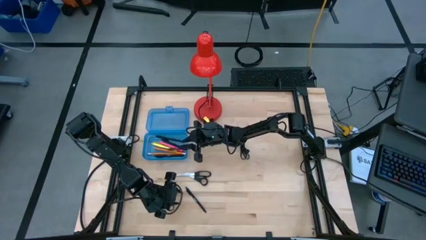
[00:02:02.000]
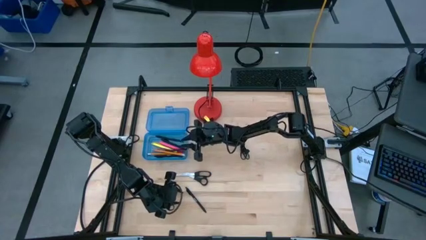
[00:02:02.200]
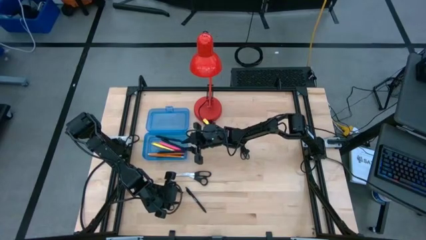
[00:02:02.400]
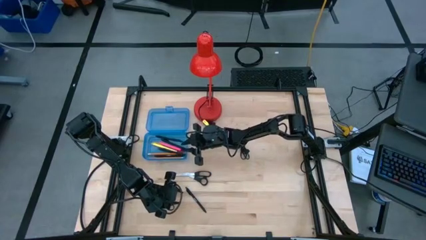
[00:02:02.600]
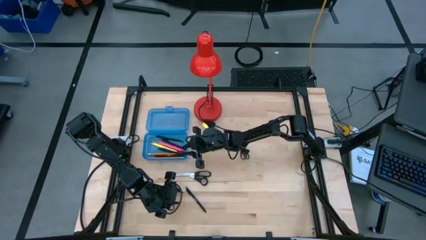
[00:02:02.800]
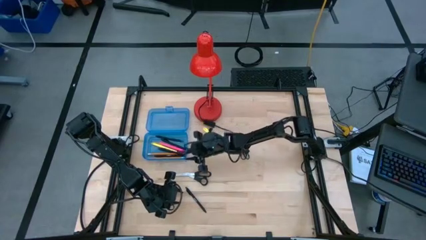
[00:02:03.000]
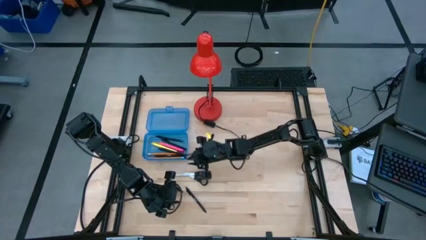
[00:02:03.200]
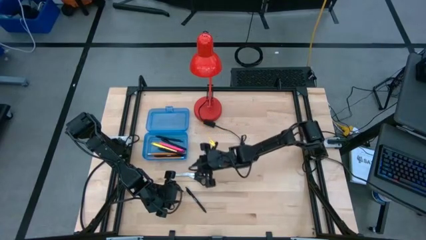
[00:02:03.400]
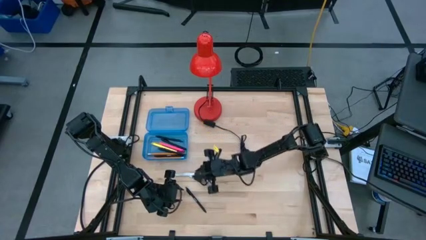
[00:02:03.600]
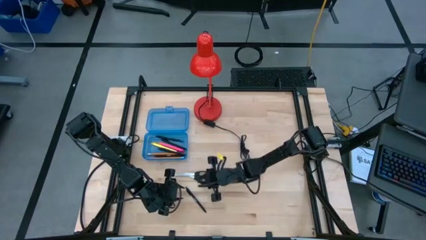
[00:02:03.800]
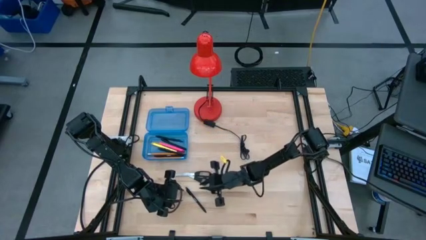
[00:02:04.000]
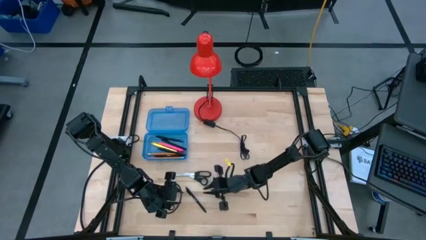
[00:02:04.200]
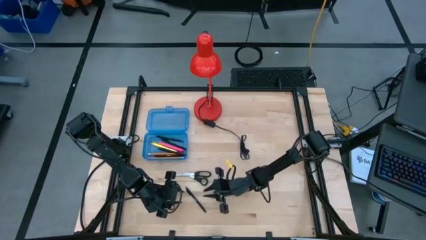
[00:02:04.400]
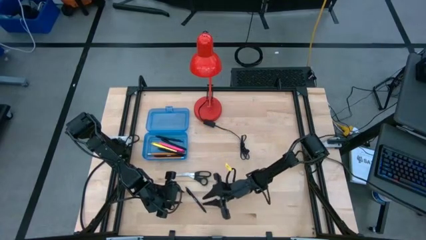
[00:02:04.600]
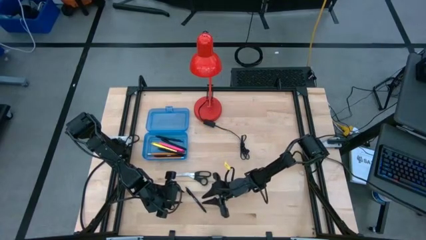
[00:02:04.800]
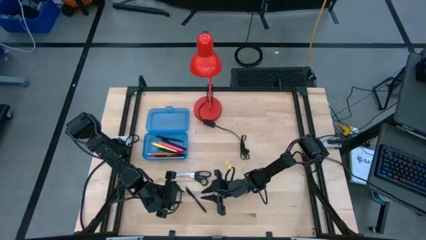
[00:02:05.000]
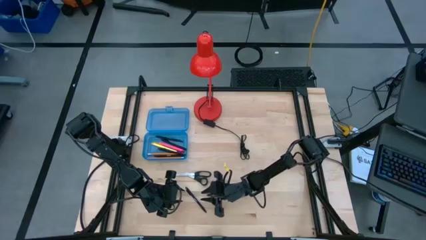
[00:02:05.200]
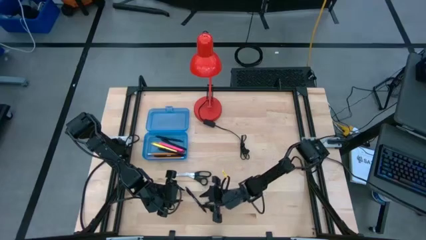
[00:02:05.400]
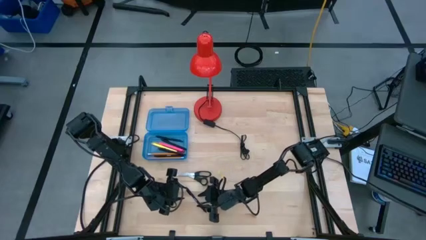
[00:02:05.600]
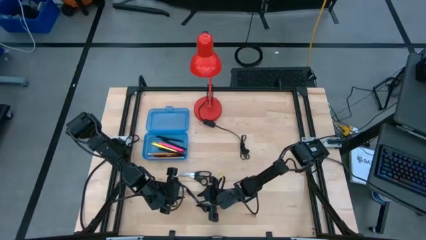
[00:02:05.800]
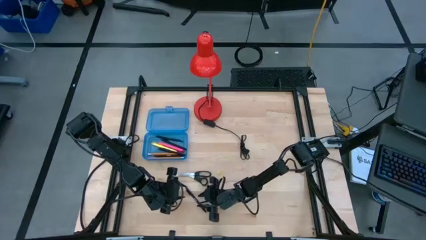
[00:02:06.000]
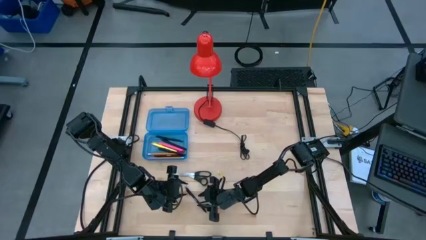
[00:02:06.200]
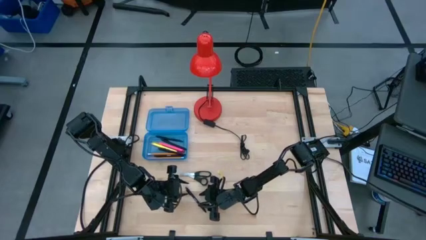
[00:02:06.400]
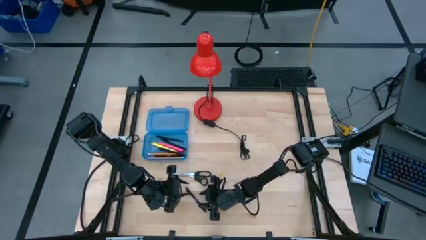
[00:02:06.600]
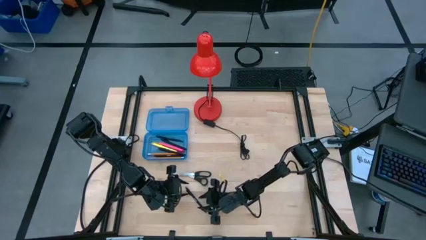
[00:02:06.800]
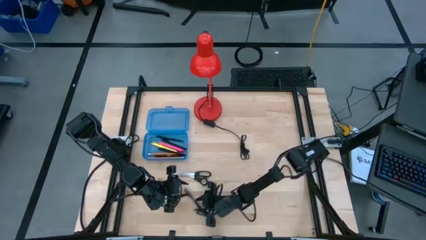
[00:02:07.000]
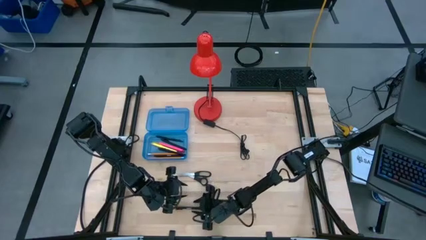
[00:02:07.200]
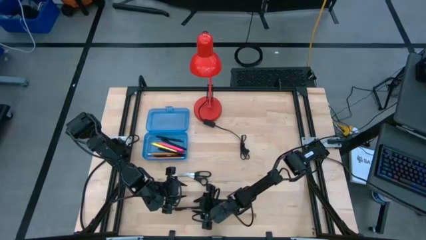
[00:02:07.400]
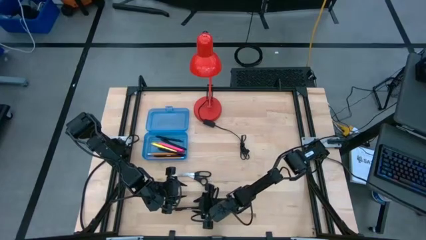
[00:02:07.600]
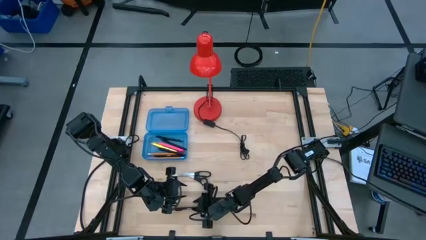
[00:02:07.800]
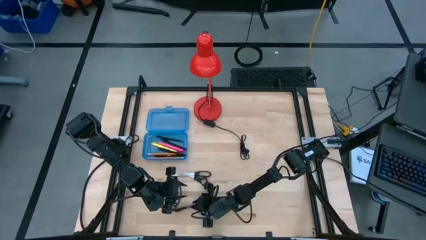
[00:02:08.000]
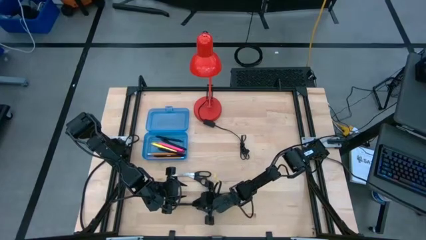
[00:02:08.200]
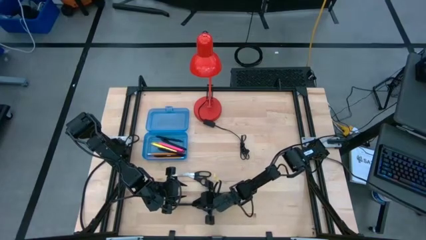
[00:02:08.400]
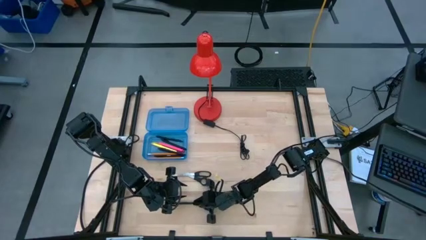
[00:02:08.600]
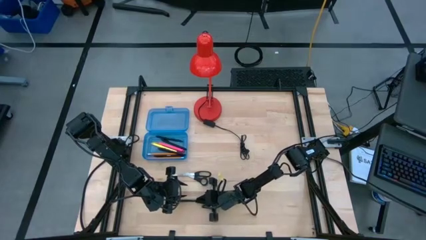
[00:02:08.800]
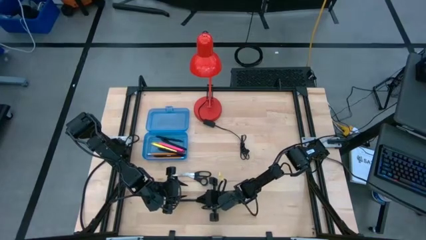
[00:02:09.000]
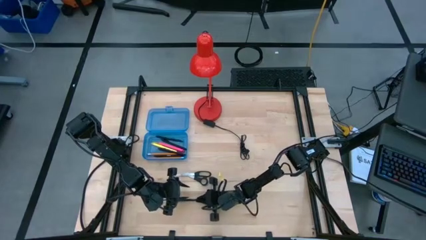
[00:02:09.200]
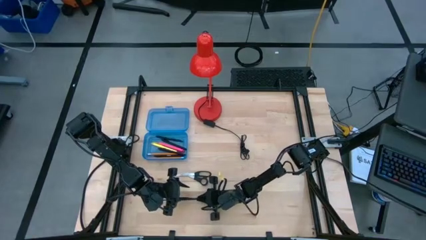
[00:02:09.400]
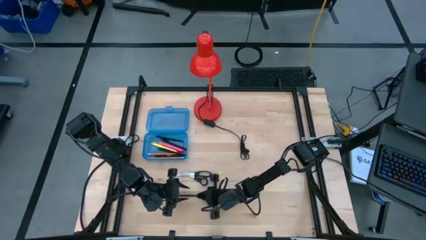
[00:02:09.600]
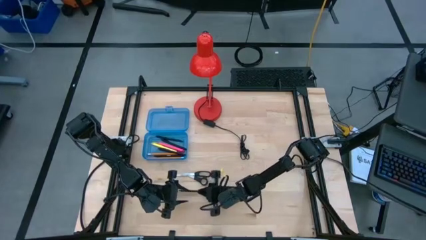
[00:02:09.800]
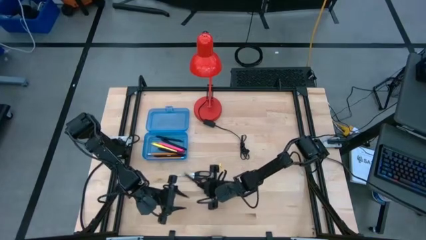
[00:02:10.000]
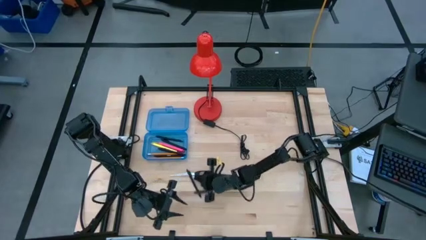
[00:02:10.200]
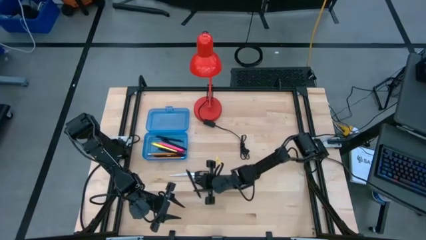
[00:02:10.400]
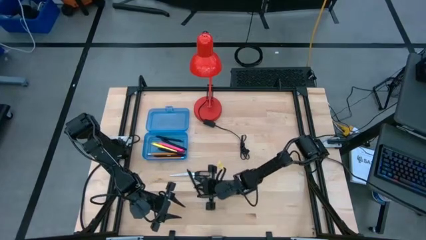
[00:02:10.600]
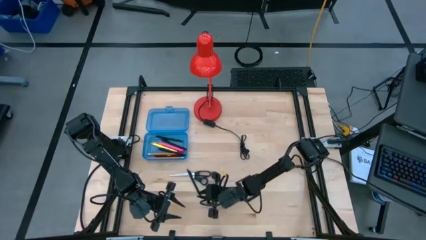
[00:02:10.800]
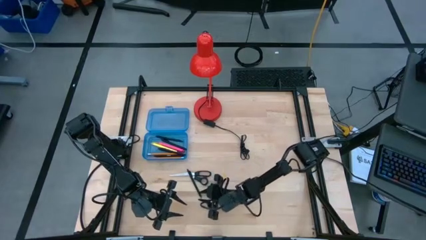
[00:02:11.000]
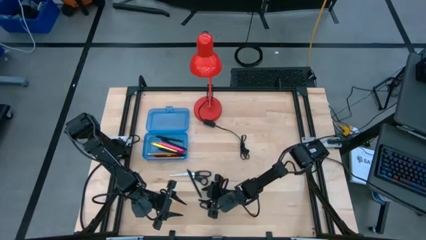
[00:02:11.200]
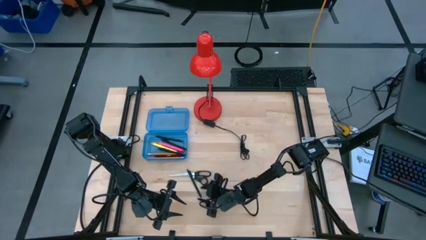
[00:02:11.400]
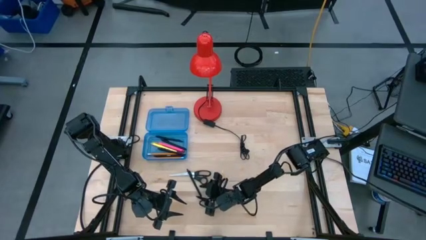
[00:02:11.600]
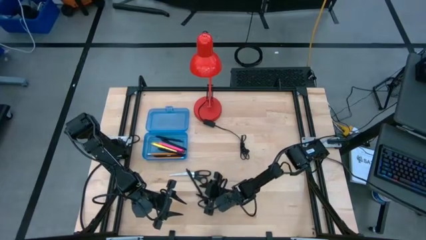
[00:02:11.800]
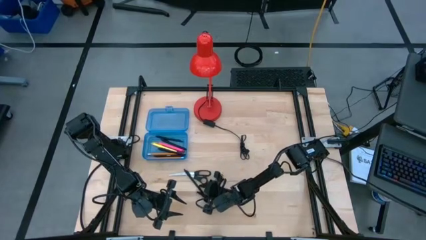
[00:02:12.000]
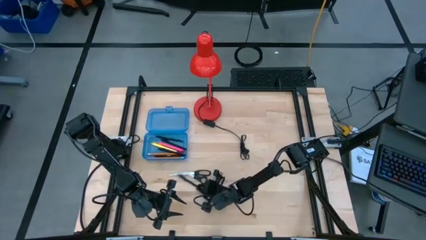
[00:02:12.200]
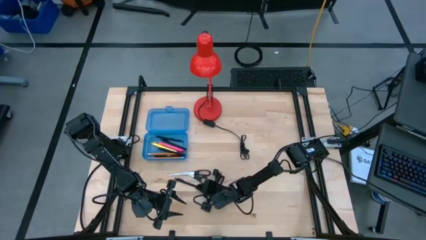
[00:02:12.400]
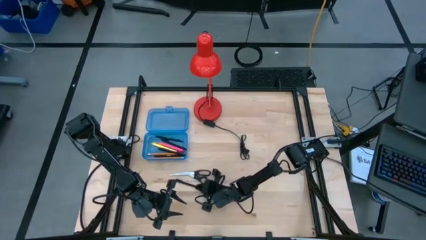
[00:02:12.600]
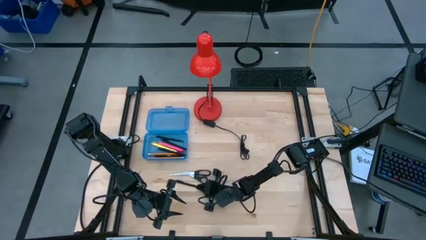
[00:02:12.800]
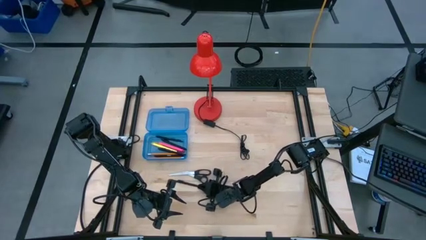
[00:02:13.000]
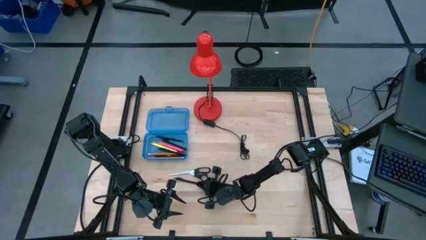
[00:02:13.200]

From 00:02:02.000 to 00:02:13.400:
Task: Pick & place school supplies into a supply box
Put the black pen into the blue supply box

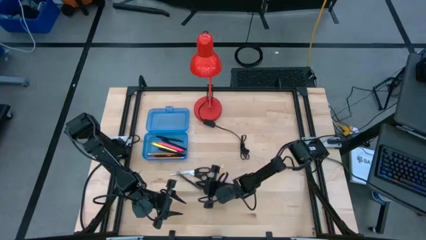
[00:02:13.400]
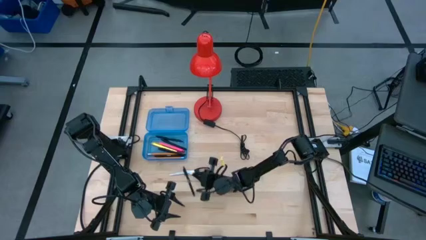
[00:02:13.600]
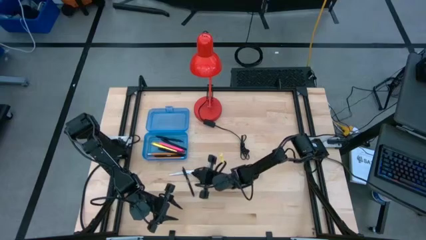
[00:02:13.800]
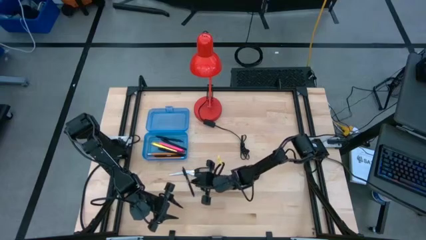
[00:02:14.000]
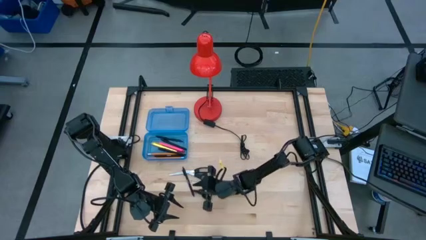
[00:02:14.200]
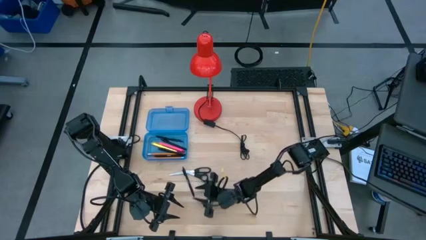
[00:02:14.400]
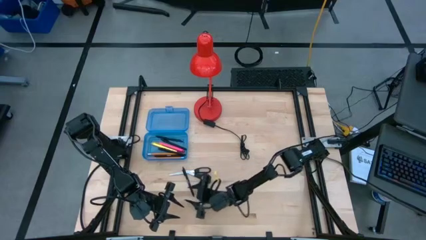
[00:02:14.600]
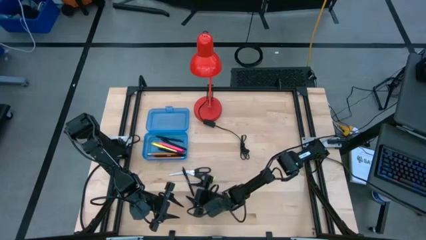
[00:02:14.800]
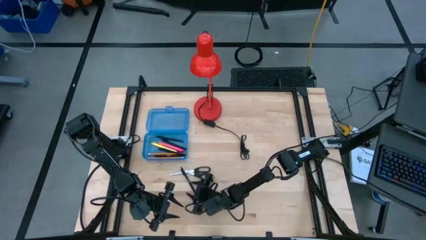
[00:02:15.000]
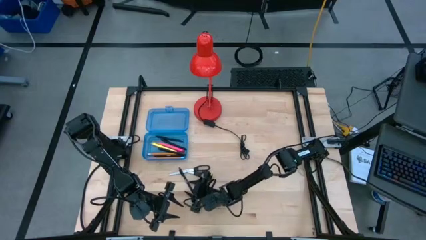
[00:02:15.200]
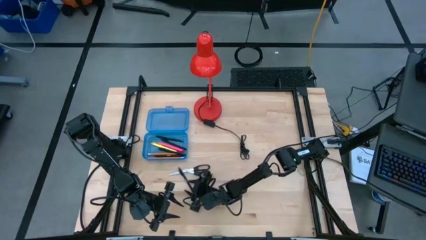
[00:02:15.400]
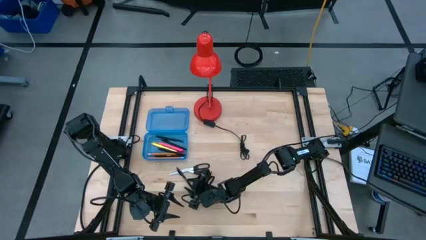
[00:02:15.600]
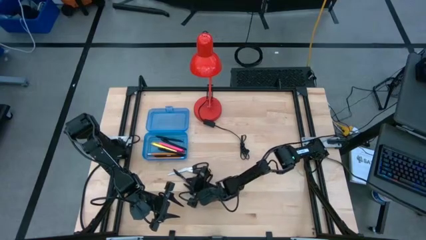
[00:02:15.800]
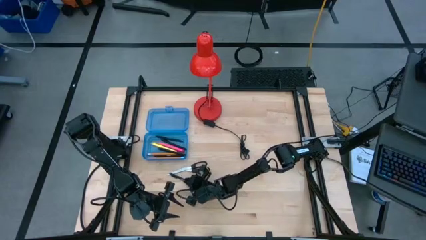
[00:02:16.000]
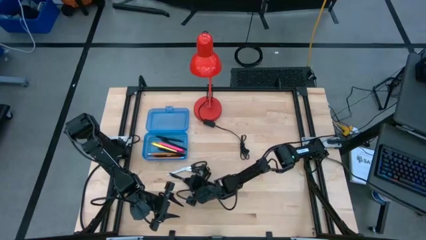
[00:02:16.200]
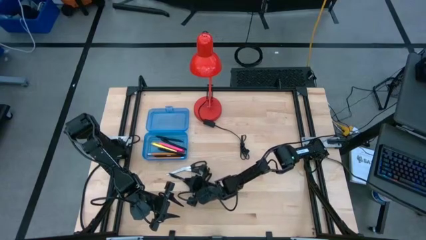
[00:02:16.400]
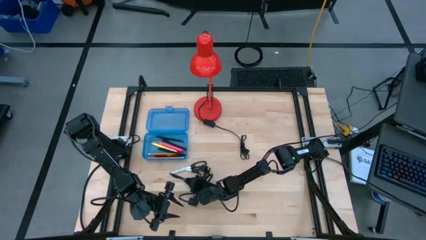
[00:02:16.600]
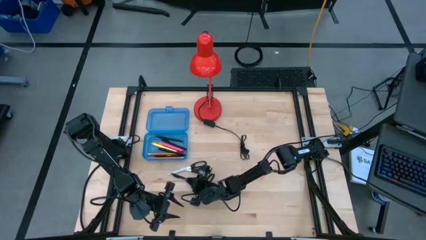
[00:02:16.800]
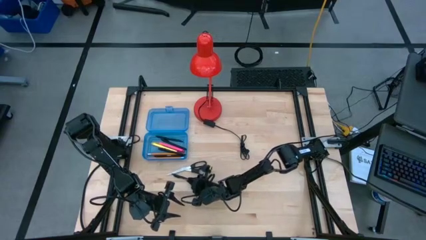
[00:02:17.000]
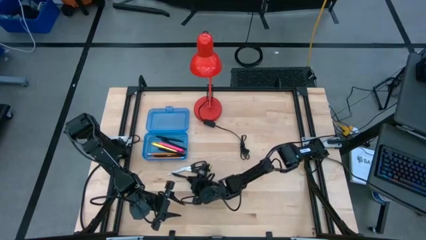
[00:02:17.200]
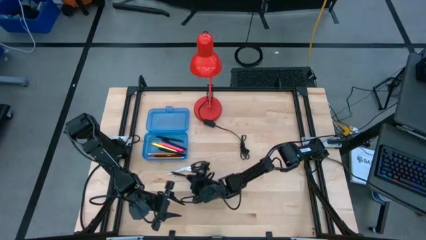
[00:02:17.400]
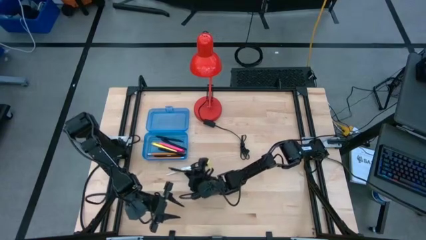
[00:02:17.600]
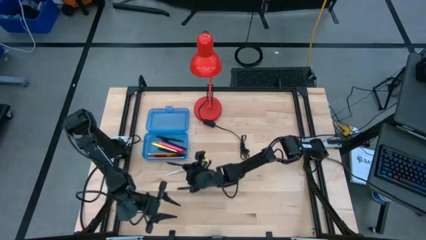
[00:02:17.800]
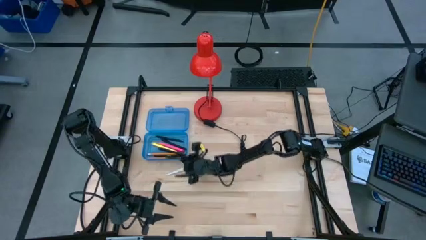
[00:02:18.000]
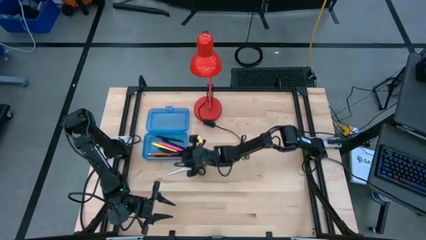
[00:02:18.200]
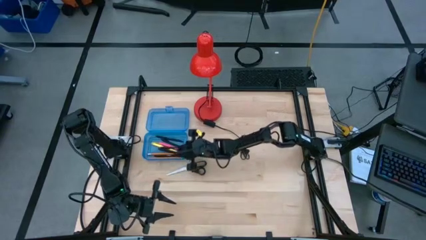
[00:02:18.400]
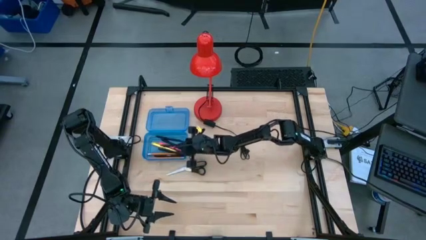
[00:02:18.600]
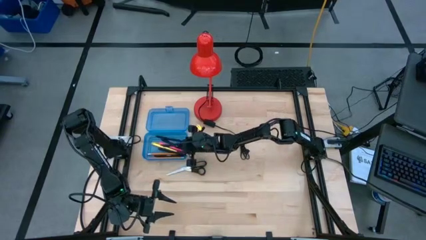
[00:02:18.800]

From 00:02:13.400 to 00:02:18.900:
Put the black pen into the blue supply box
